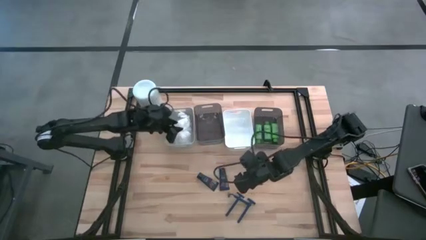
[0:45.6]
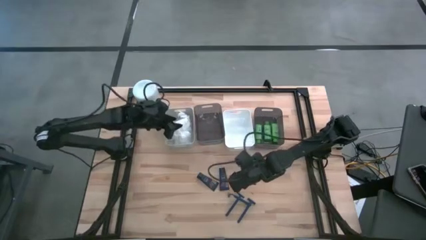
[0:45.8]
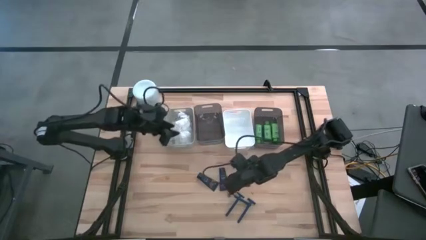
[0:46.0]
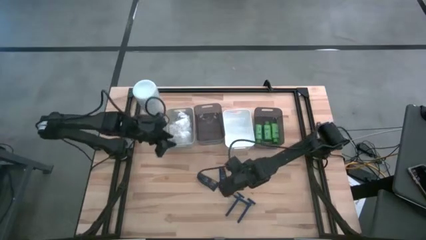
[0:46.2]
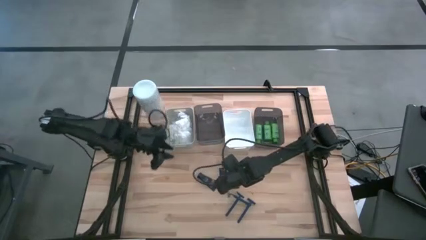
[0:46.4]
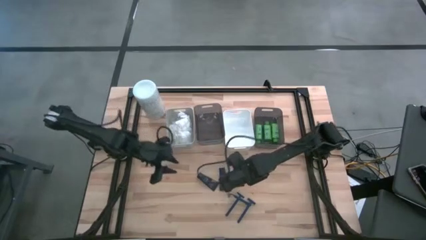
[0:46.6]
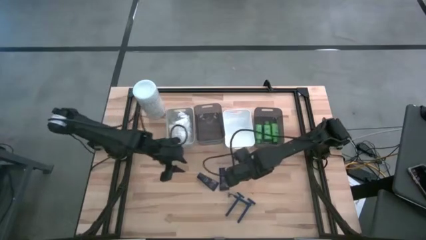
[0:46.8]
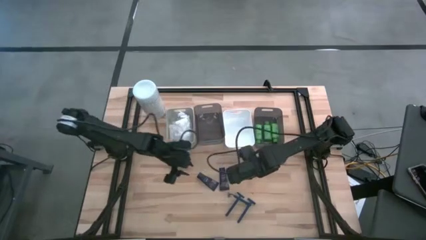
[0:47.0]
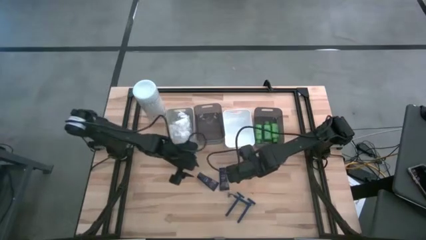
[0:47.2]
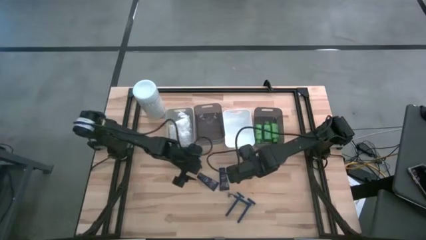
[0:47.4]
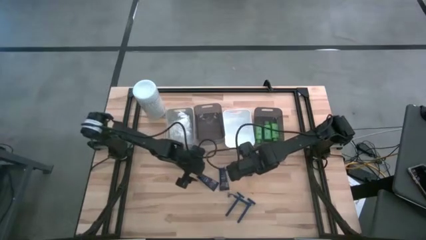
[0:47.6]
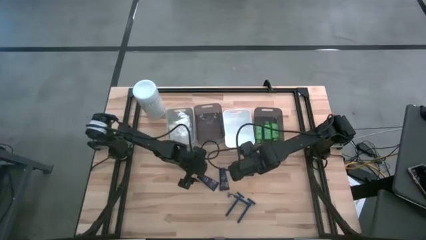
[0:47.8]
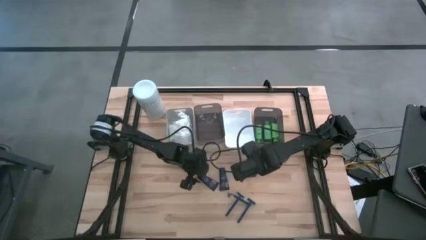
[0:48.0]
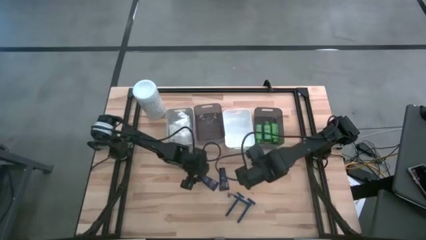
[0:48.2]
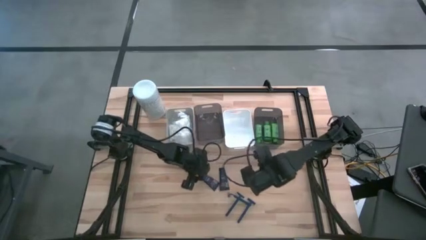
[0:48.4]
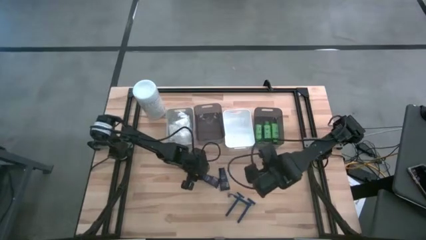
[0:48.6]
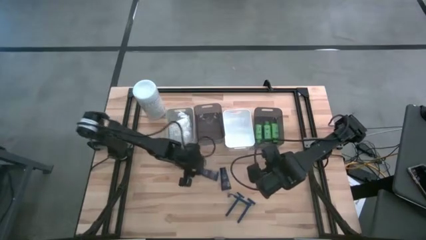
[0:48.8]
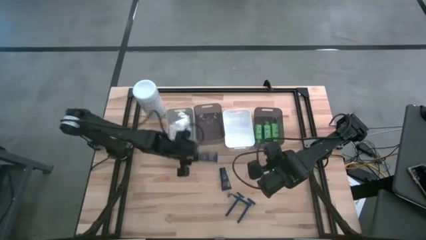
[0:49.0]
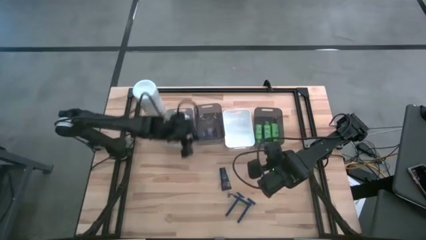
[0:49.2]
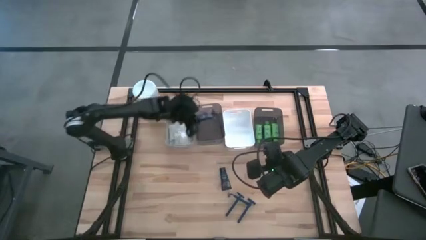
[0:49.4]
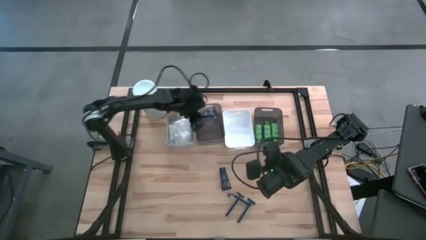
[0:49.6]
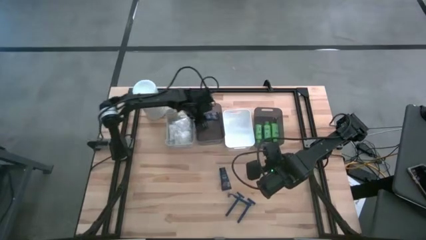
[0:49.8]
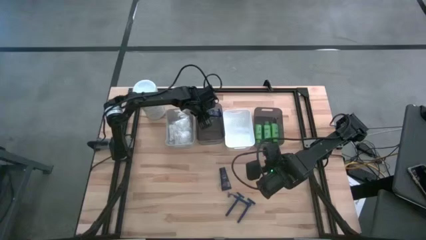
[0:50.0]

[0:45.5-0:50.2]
Task: Pick & Place Travel size toiletries
Put the left shave cream in the left black bin

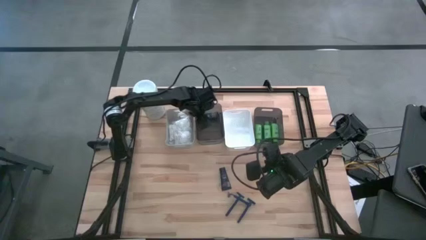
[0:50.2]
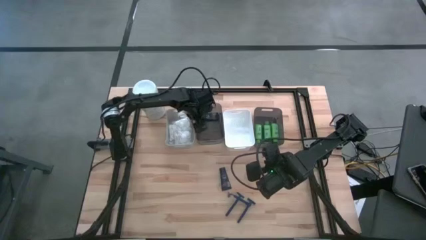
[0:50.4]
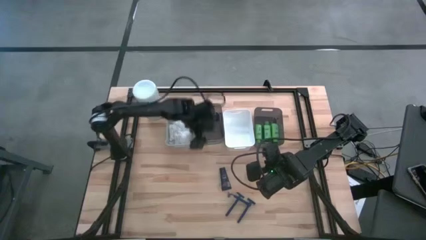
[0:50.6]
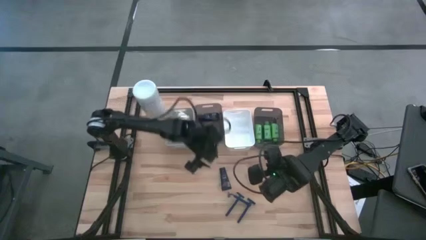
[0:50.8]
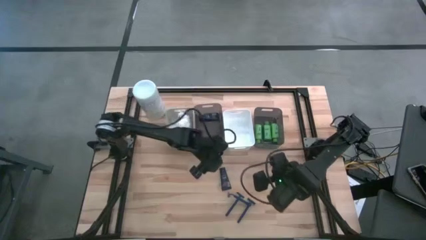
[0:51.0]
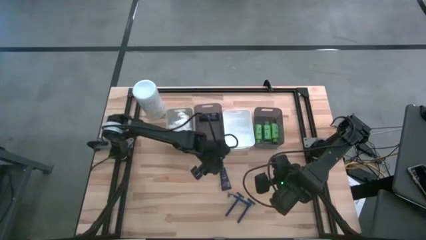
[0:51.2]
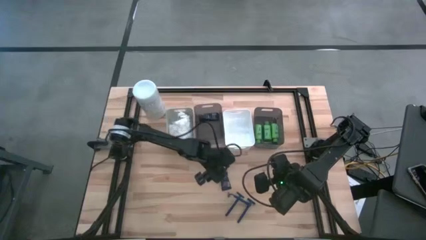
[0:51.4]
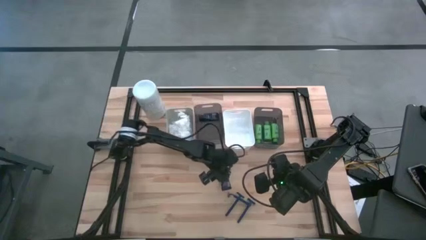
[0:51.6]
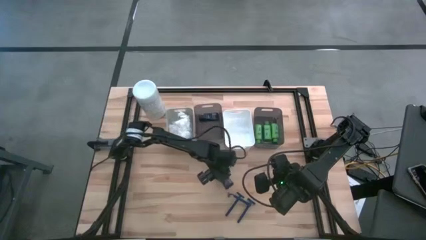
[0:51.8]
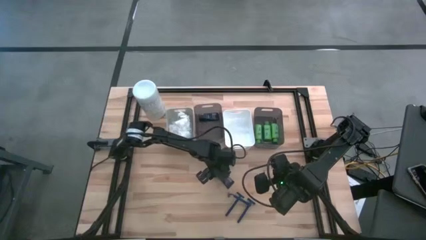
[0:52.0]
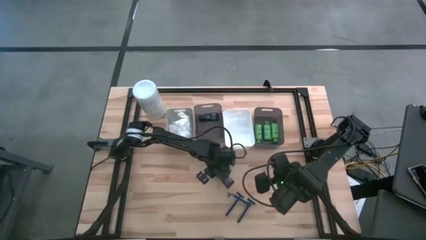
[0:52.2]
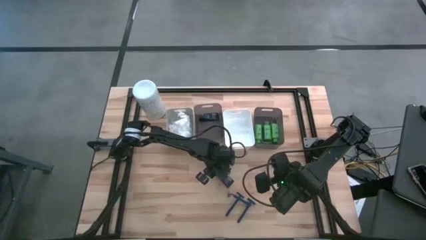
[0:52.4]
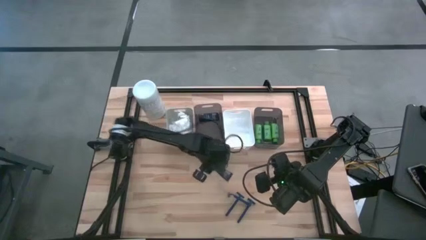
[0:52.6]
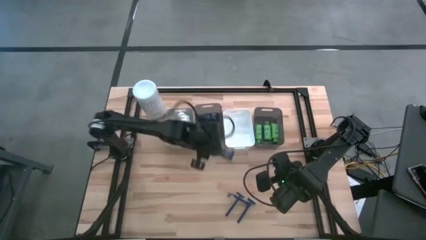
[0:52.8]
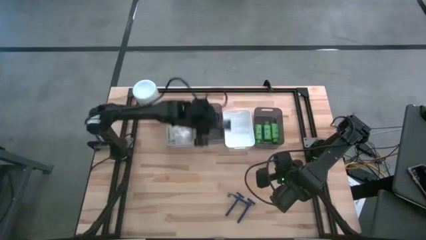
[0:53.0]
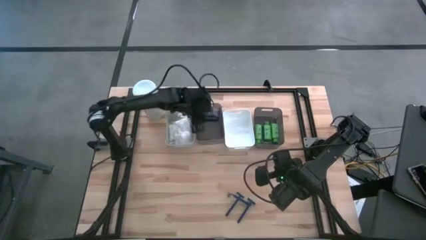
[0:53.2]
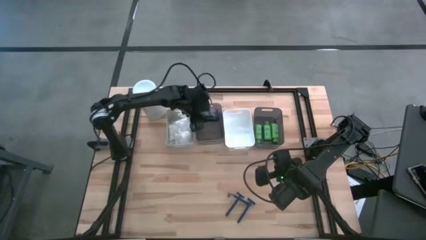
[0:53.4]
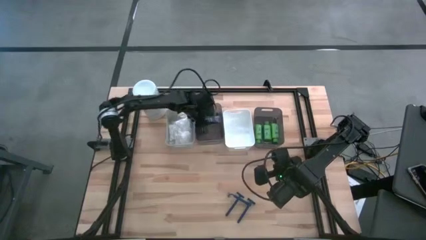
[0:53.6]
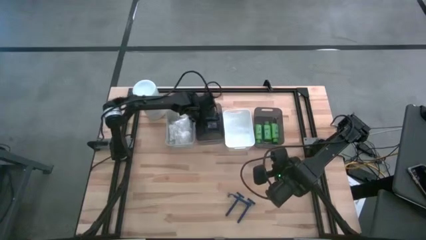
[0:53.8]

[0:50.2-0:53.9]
Put the shave cream in the left black bin

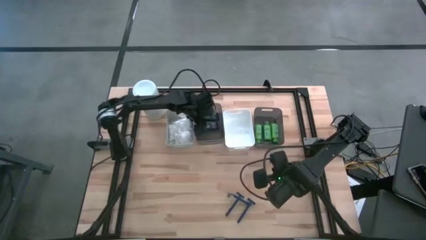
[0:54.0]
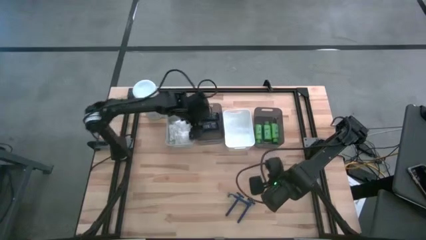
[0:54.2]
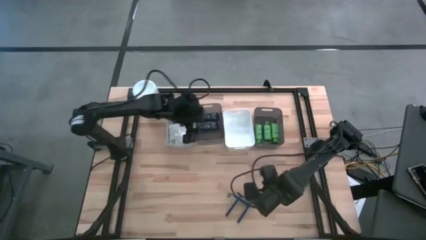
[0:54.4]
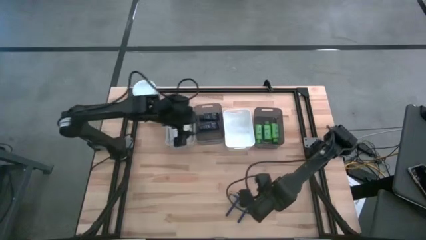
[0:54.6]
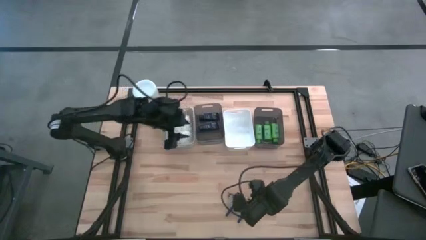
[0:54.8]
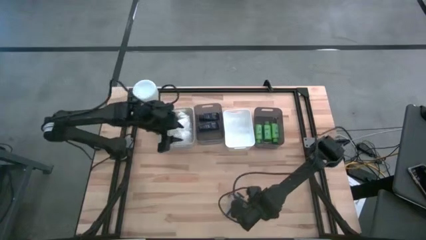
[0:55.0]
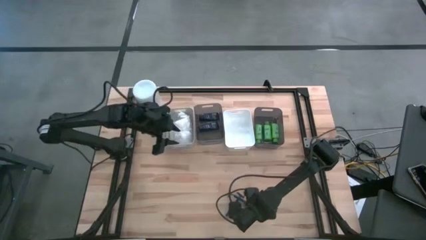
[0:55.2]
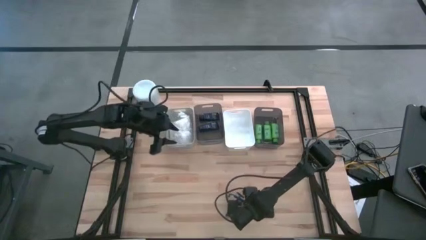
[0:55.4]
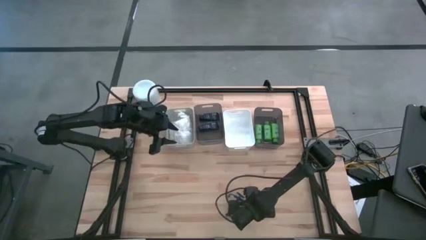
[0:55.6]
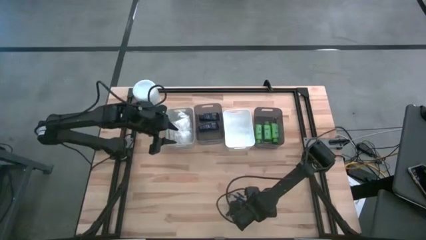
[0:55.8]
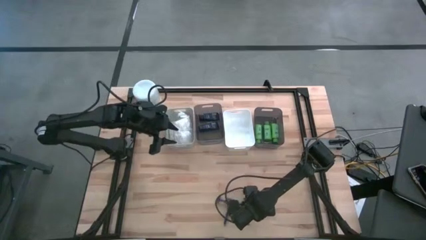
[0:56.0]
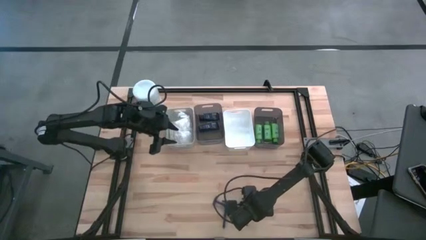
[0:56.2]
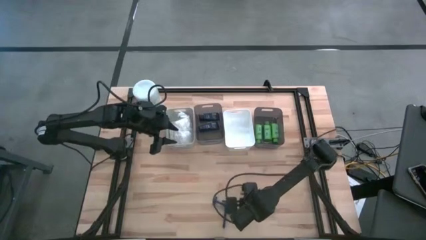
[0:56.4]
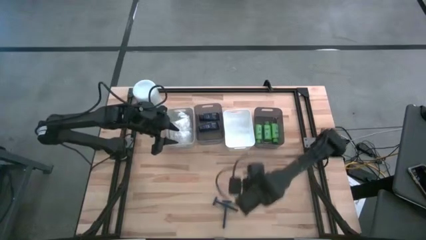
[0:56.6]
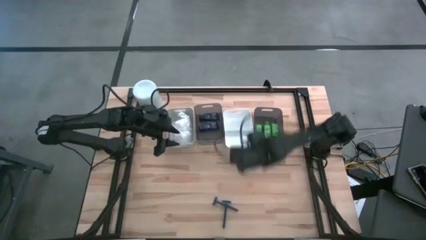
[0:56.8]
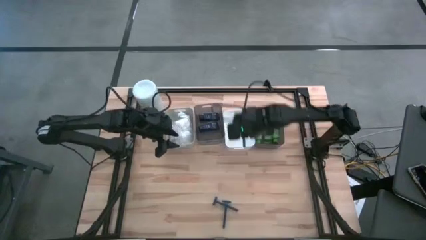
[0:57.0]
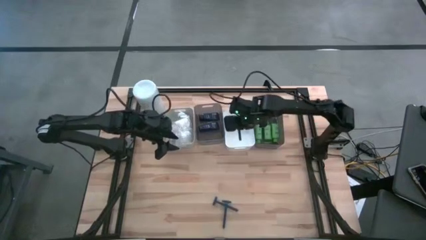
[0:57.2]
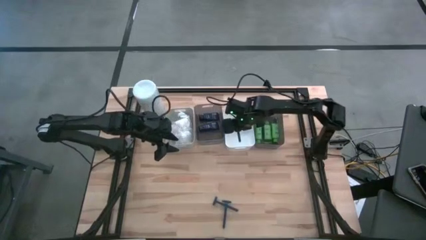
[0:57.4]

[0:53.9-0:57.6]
Put the right razor in the left white bin

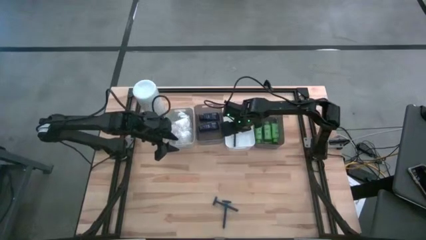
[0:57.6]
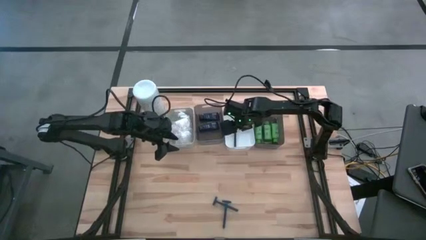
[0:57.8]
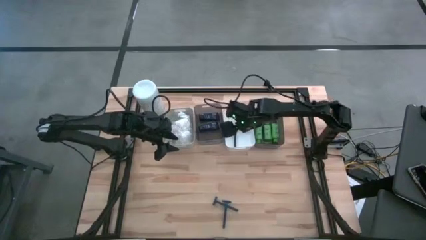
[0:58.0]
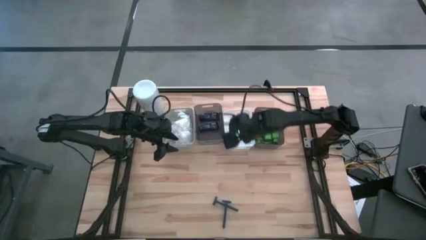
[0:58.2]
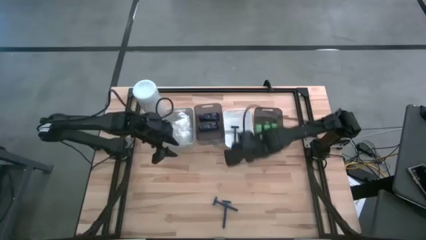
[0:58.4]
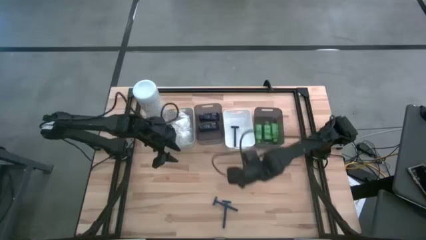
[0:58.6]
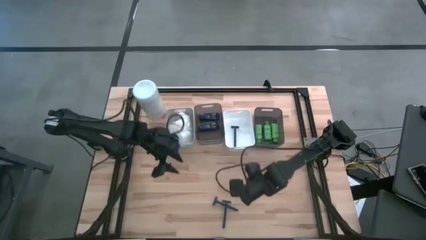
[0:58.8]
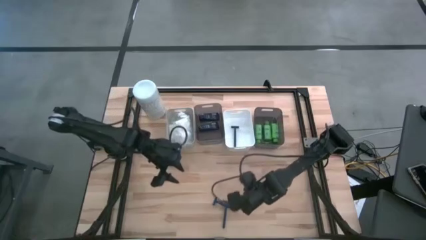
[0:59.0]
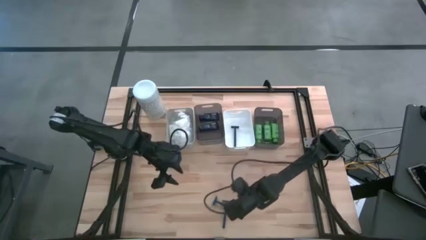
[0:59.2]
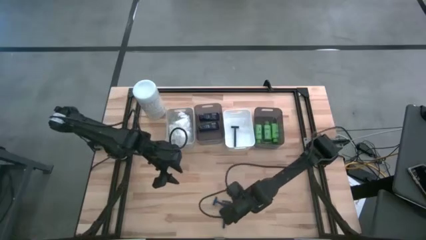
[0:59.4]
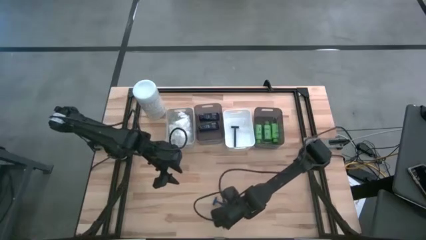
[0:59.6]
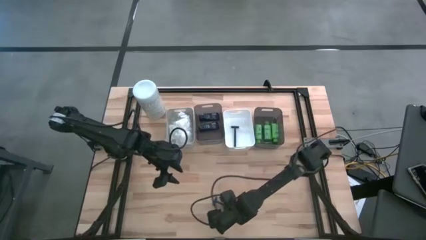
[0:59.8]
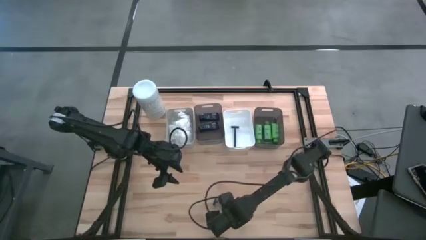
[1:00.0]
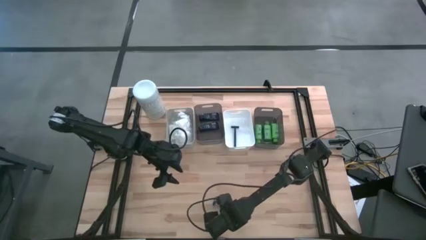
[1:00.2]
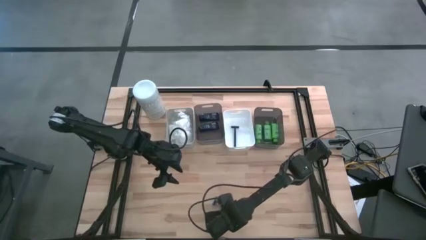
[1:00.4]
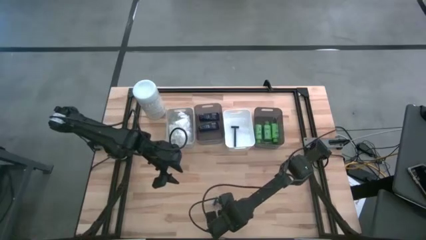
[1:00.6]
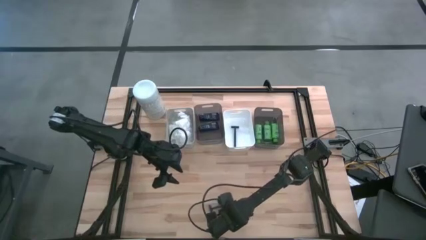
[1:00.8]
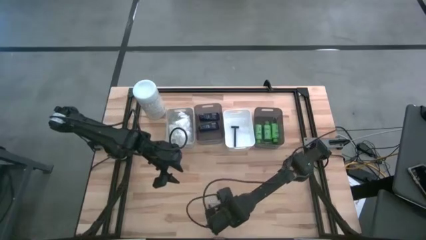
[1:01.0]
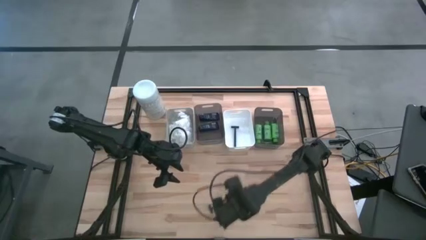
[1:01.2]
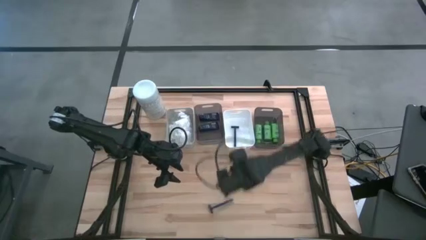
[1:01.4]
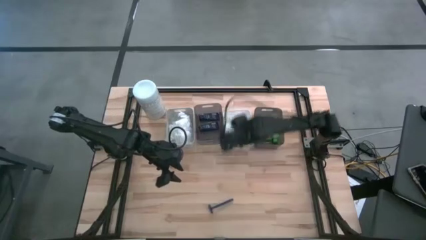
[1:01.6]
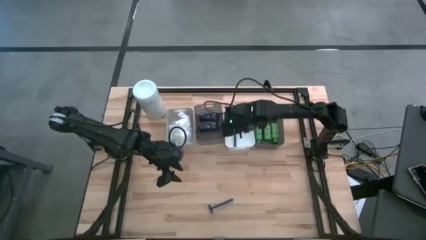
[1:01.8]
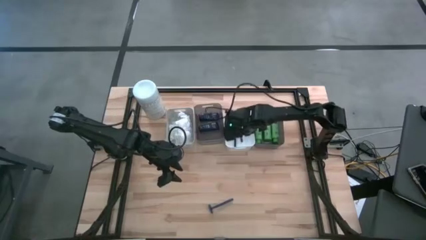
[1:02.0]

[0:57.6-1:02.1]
Put the top razor in the right white bin
